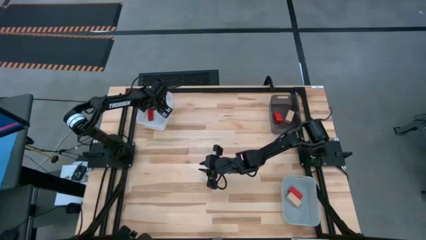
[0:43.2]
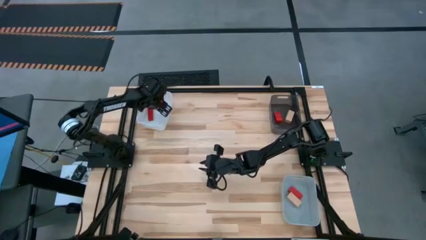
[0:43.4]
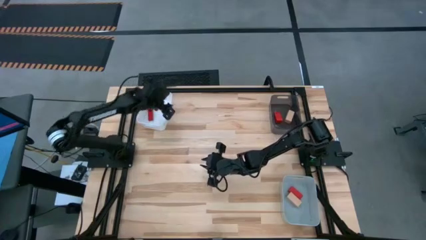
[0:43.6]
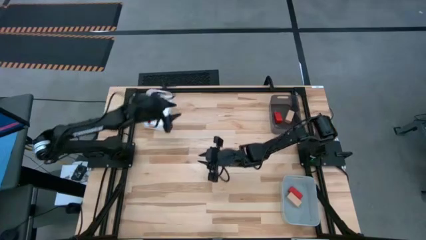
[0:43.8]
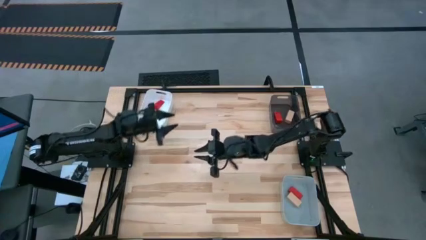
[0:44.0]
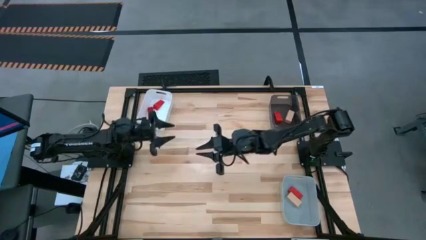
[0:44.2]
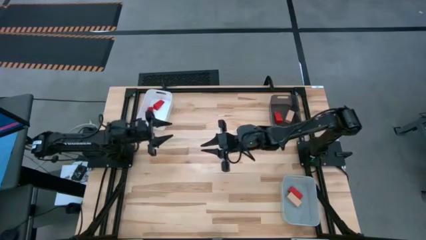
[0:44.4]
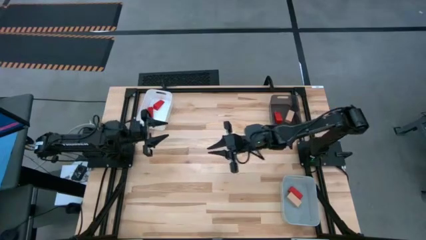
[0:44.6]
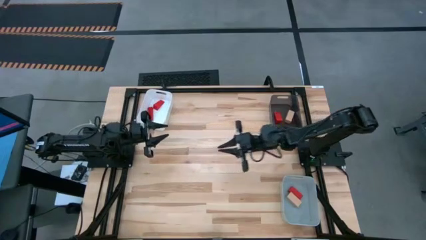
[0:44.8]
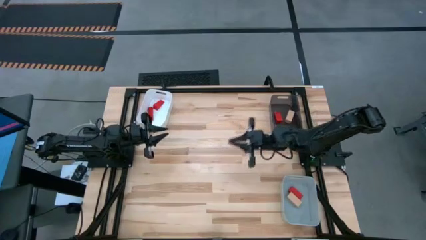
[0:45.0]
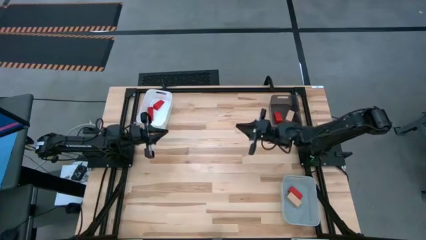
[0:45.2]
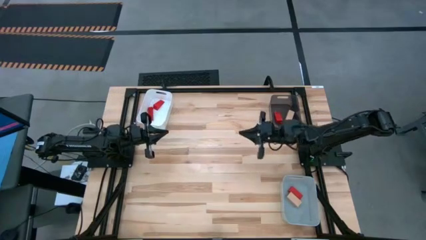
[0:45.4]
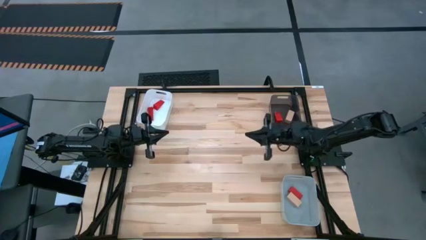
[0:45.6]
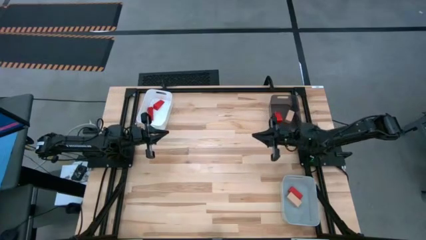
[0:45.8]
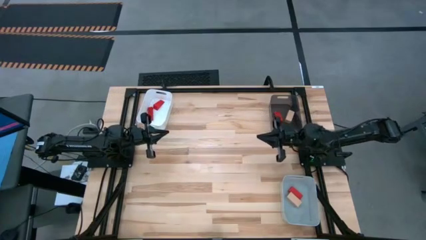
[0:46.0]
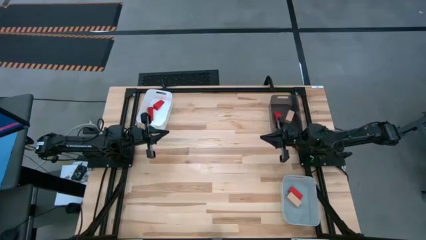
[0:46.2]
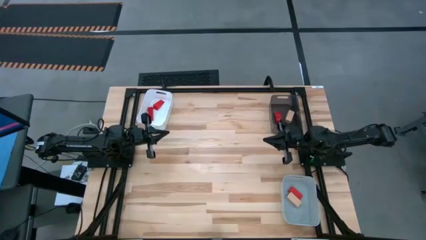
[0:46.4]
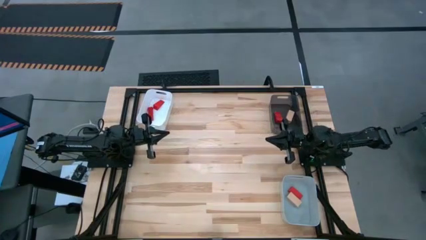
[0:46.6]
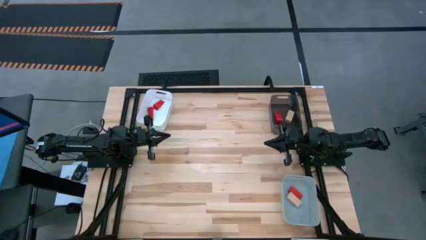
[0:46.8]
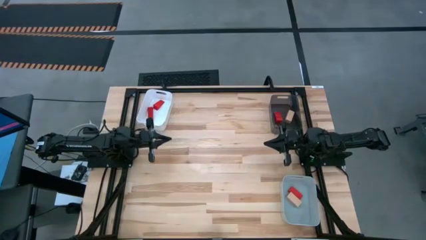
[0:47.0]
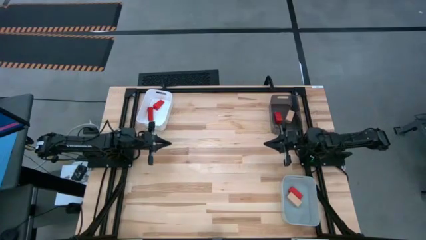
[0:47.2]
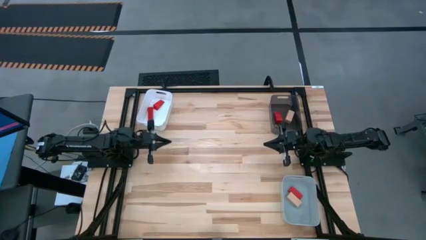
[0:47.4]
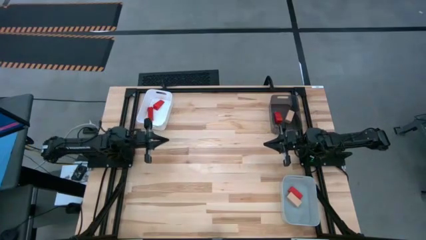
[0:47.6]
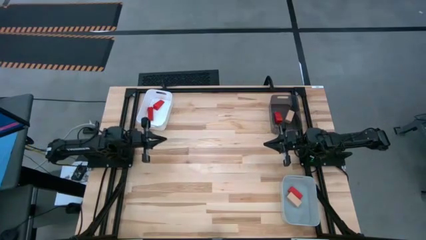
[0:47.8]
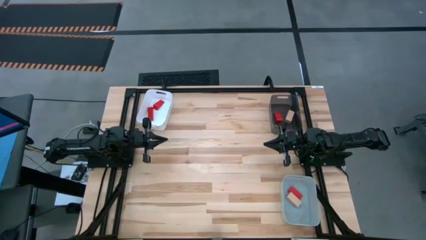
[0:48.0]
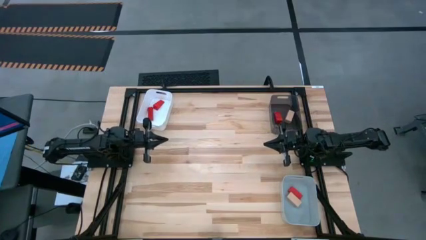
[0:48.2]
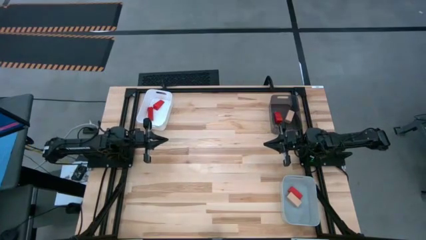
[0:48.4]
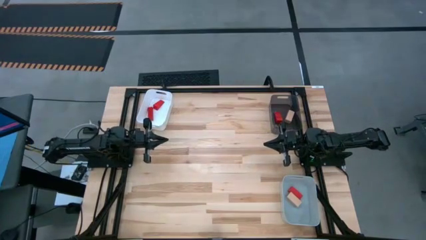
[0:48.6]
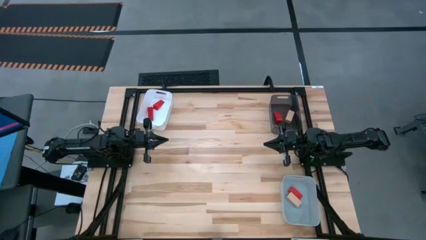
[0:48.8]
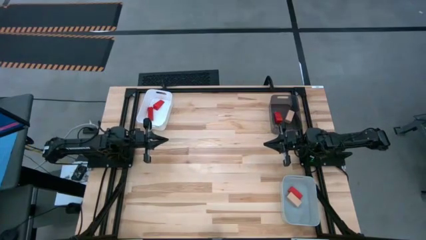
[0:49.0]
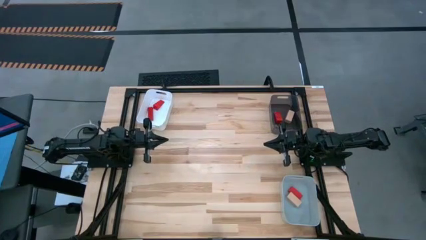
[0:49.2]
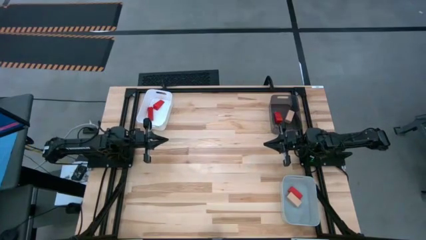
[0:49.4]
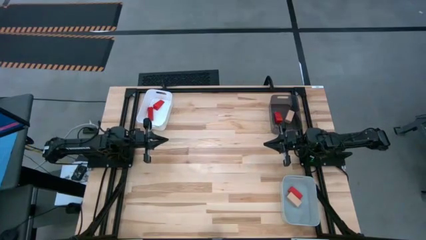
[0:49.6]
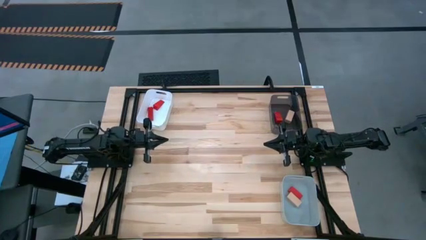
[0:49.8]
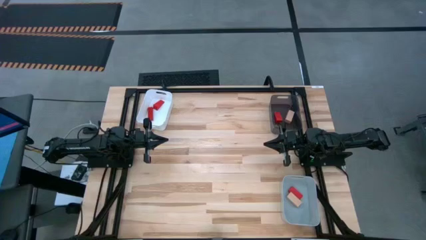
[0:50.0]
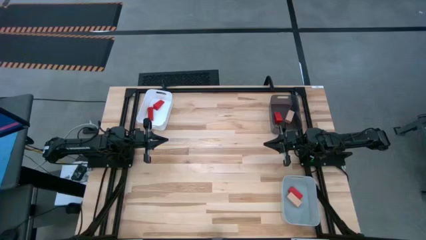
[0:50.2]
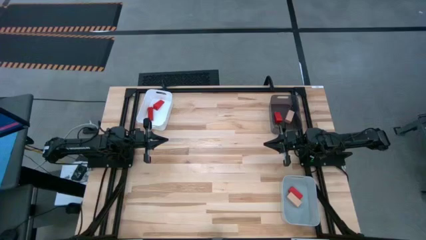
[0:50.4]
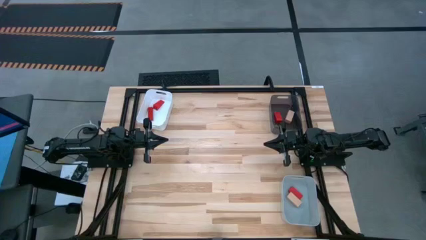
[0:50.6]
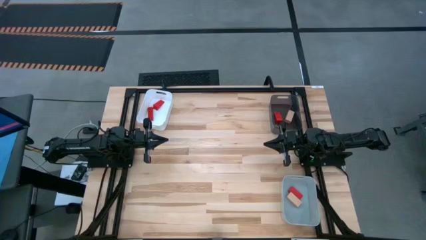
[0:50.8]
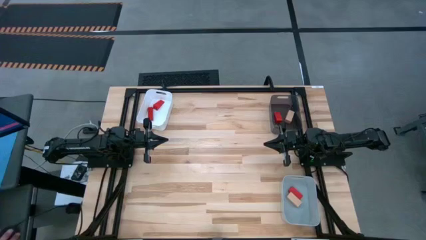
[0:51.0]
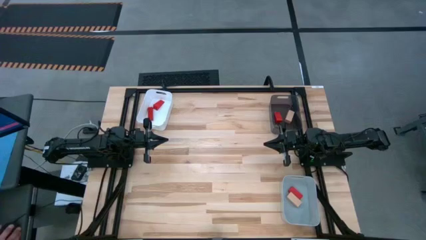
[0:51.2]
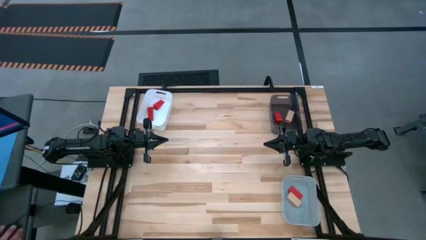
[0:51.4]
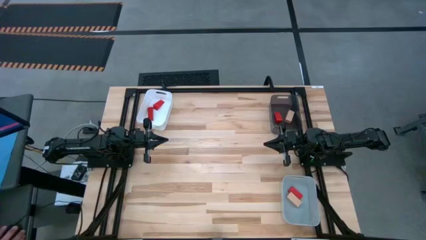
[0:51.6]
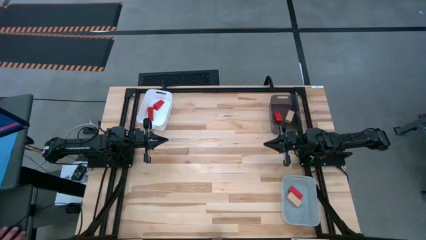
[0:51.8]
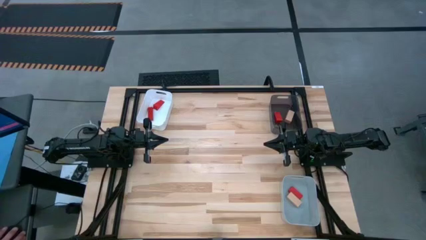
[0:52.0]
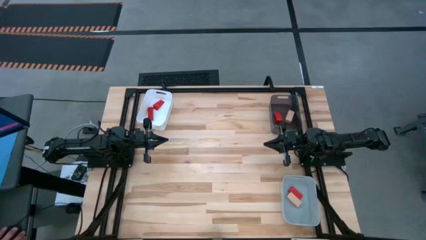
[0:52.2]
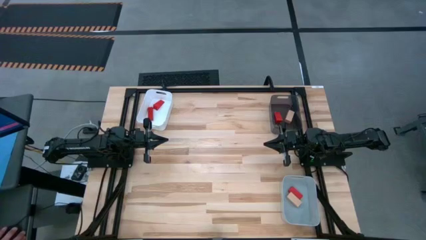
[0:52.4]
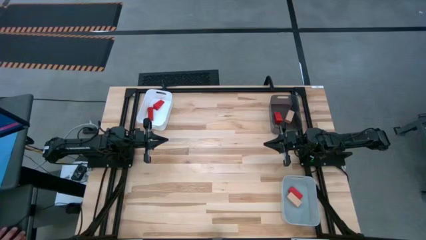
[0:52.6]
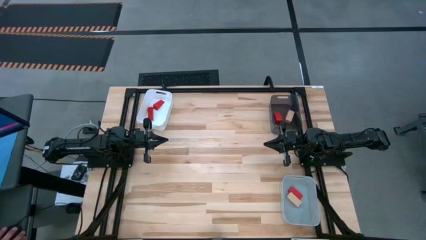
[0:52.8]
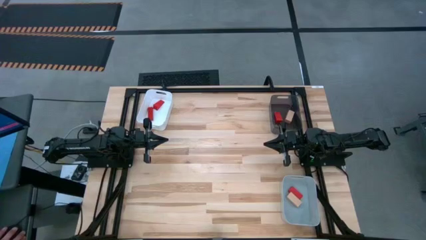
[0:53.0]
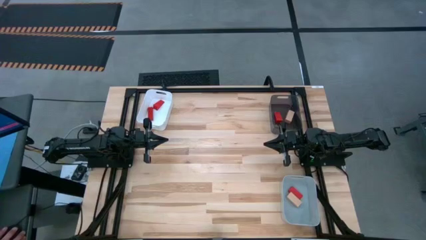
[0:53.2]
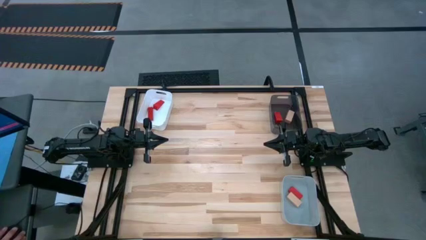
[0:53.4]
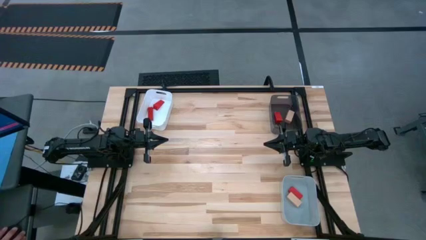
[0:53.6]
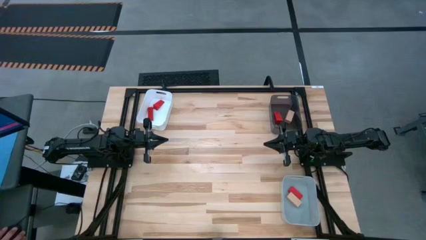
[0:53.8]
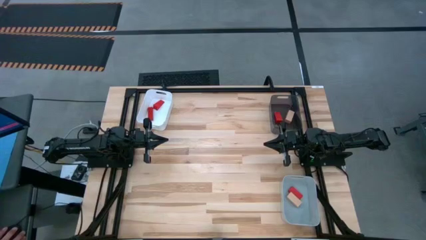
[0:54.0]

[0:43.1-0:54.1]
Task: Sort & place blocks by color
Return to Home Position

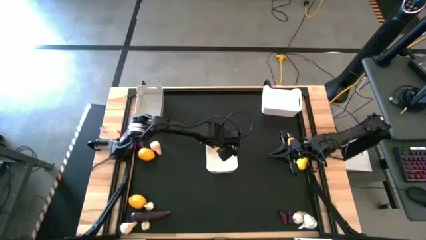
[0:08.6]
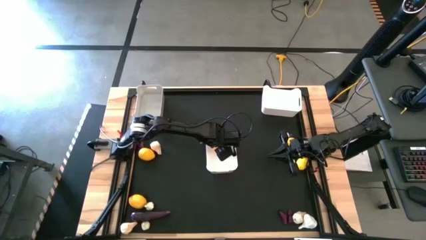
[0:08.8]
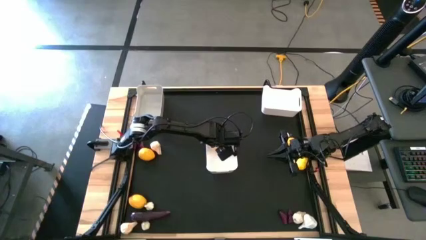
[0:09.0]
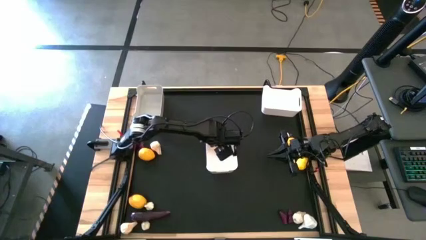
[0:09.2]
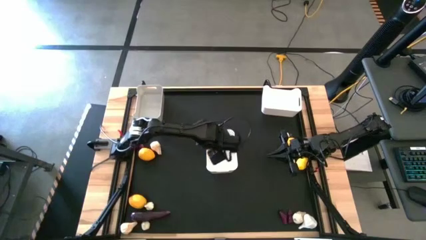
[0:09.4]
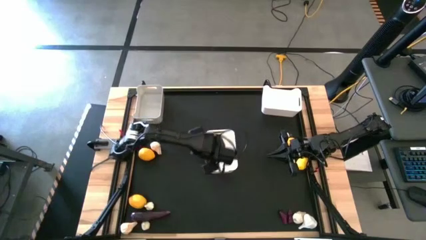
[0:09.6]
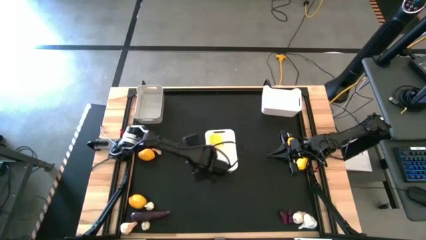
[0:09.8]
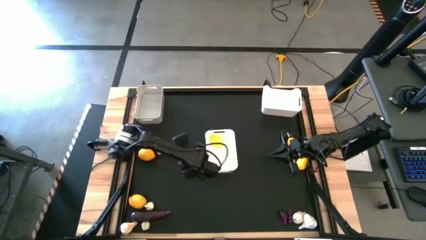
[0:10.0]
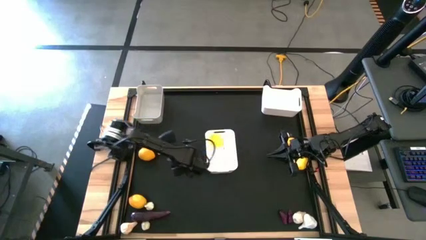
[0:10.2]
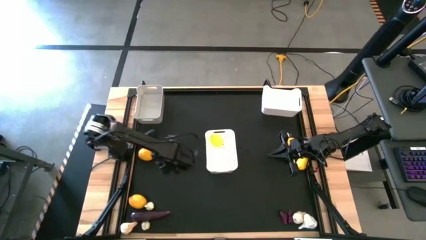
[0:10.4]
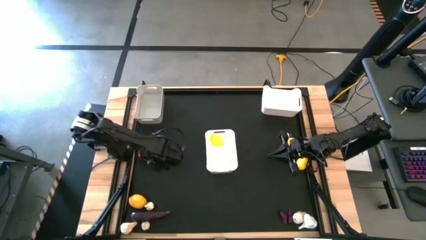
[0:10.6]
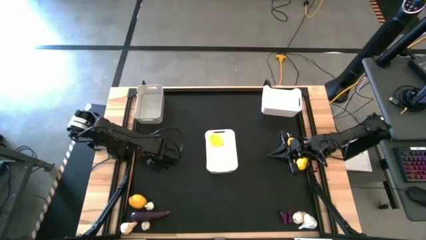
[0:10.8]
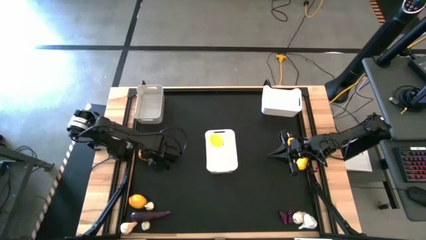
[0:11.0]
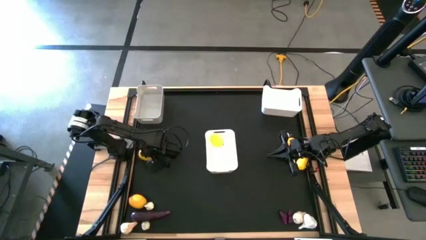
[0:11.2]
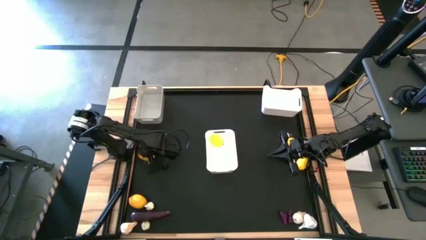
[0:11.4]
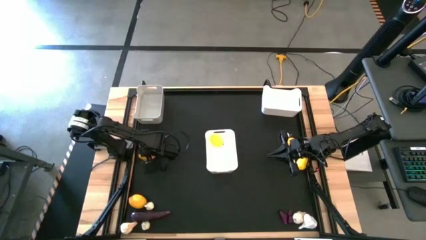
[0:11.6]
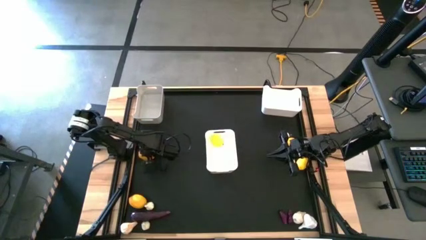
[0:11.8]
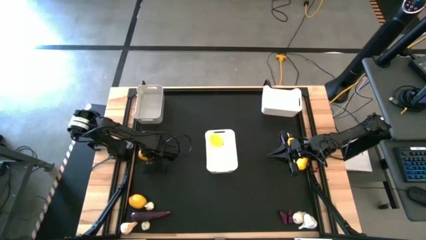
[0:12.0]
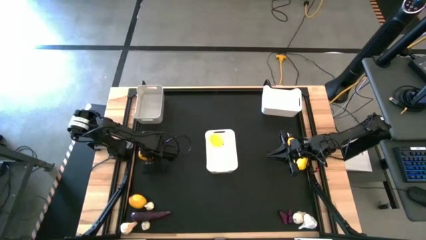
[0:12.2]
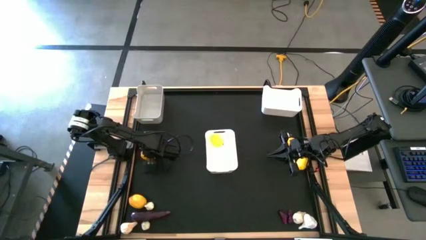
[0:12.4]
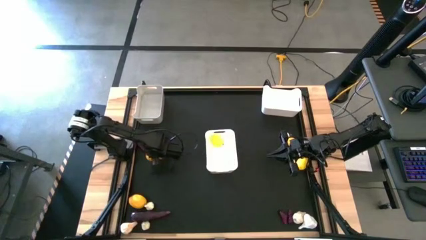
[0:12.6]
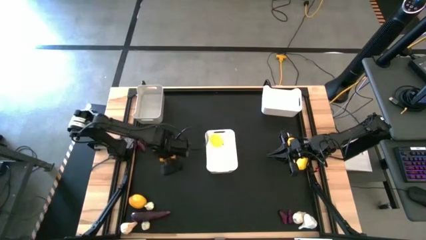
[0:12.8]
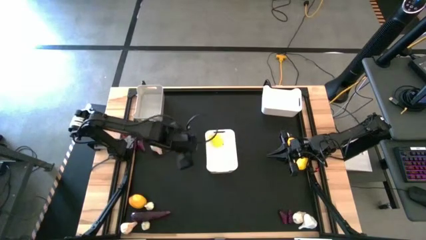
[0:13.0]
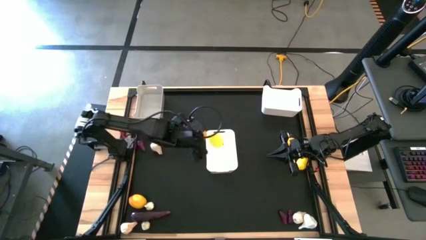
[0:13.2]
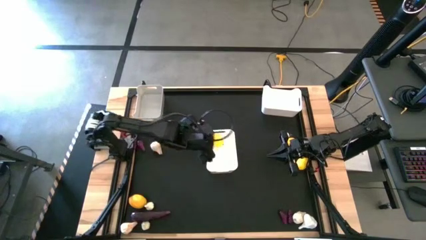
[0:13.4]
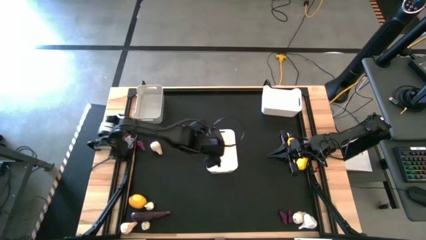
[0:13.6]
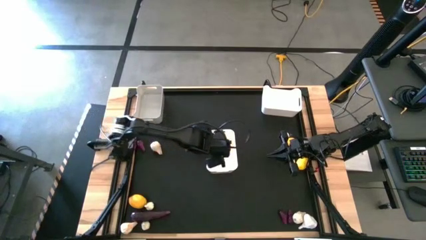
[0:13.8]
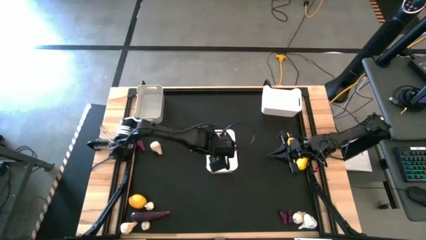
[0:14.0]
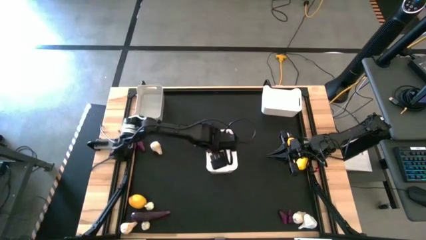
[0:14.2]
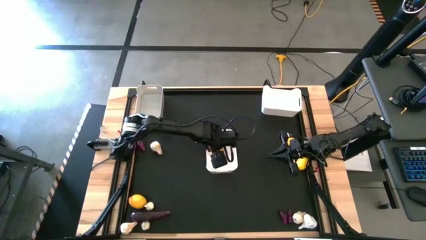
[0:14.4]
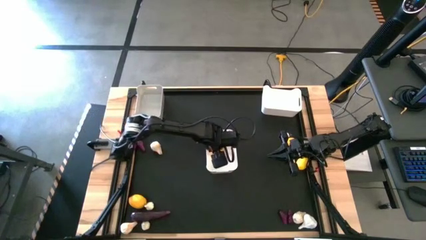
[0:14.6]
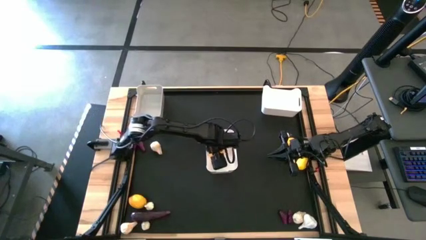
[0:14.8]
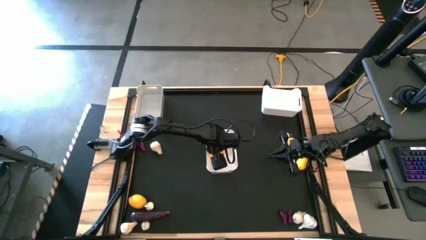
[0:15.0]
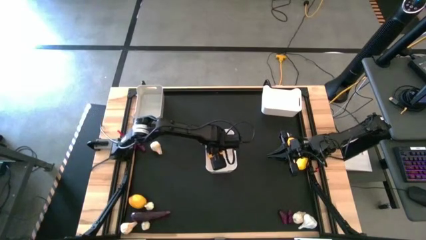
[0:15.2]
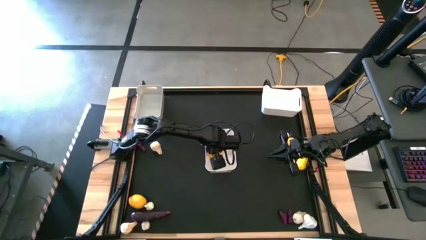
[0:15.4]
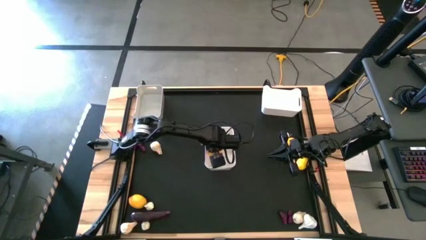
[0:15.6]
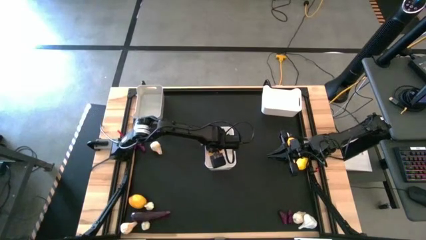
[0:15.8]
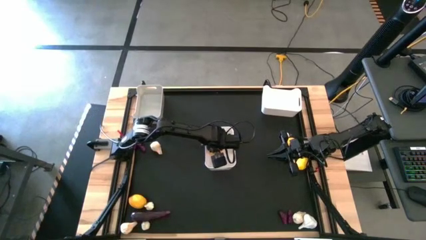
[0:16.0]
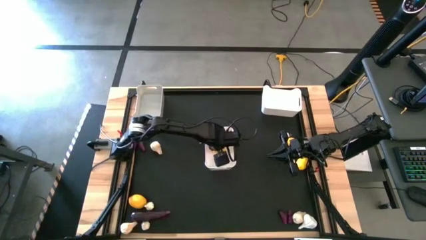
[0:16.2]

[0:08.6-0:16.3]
Task: Sort produce into baskets
Put the lemon into the bottom white bin
